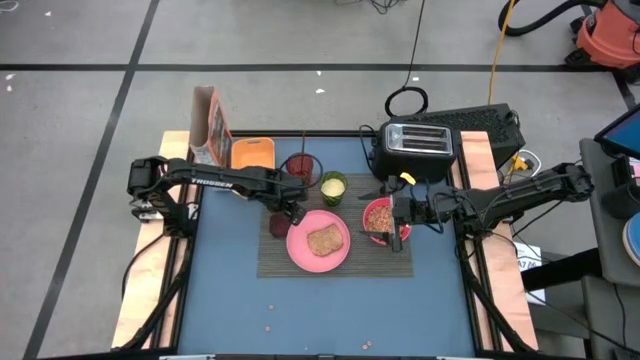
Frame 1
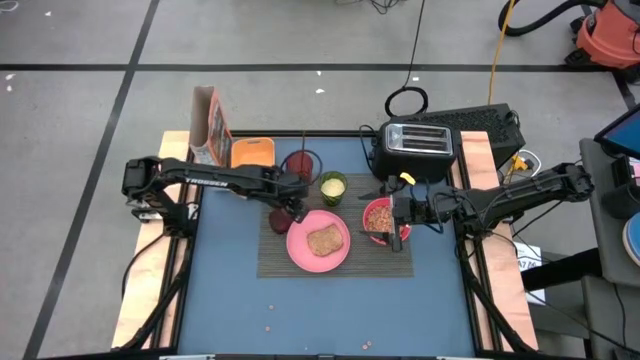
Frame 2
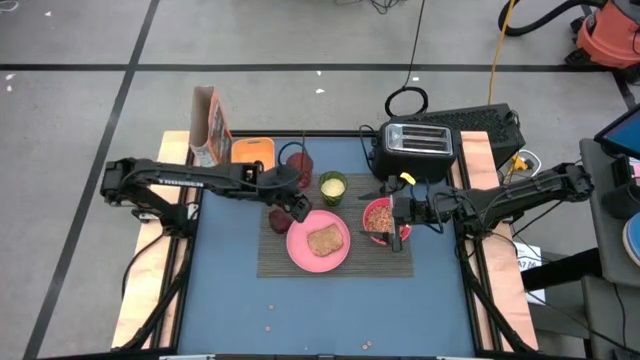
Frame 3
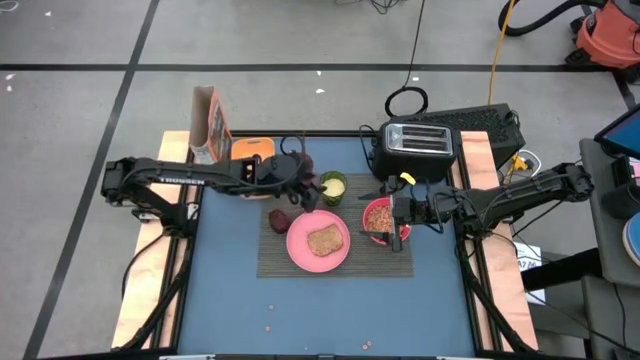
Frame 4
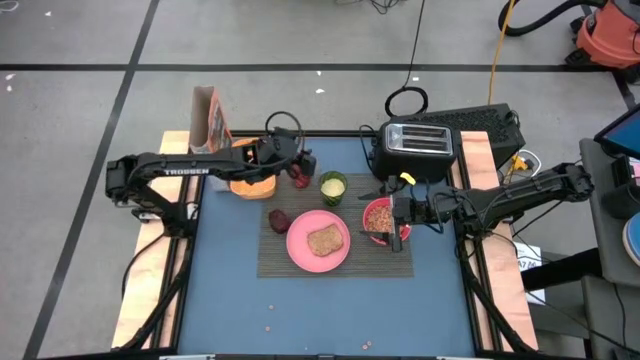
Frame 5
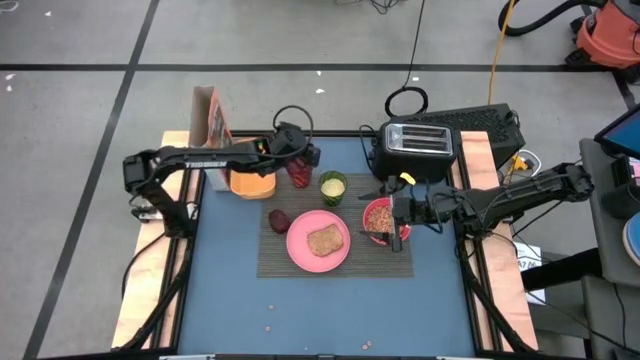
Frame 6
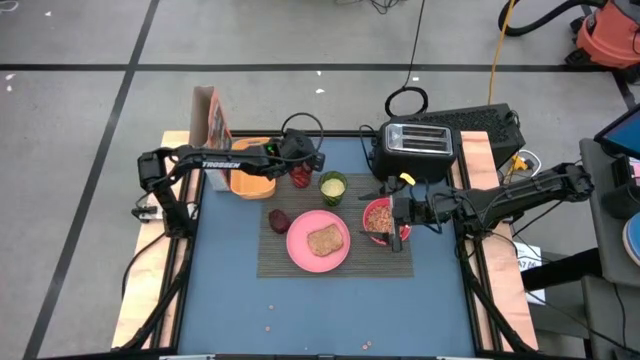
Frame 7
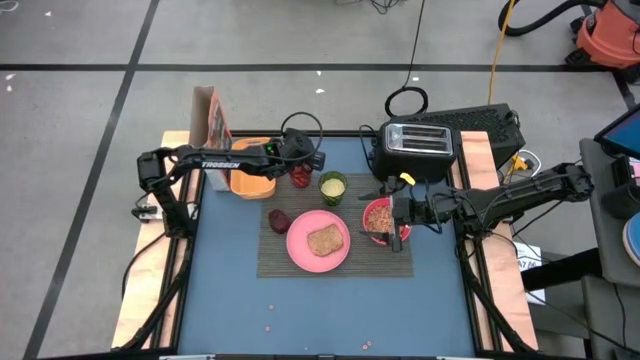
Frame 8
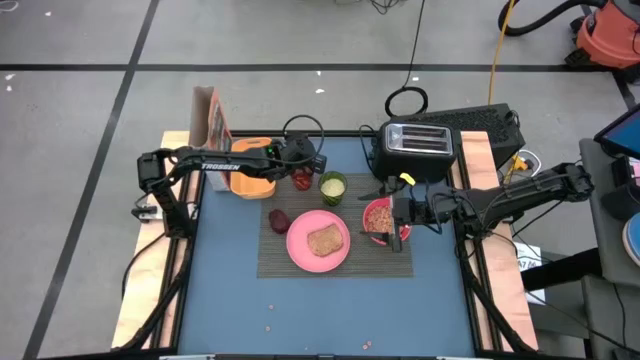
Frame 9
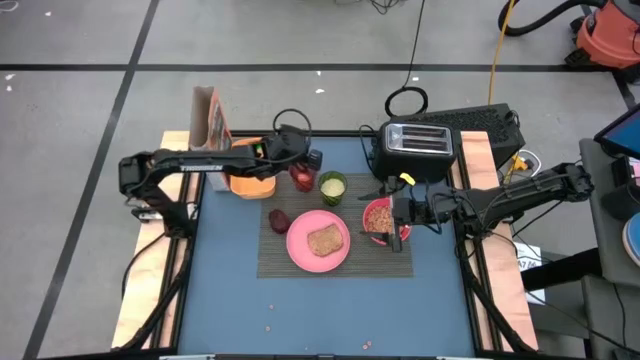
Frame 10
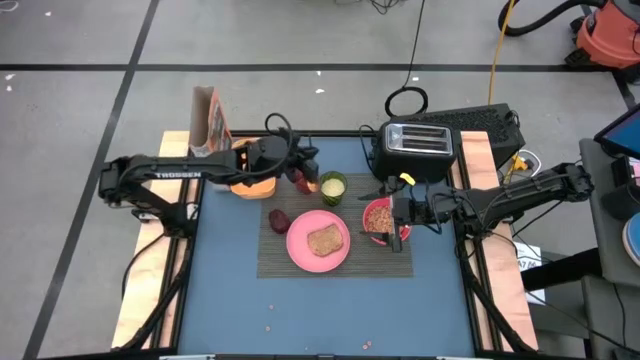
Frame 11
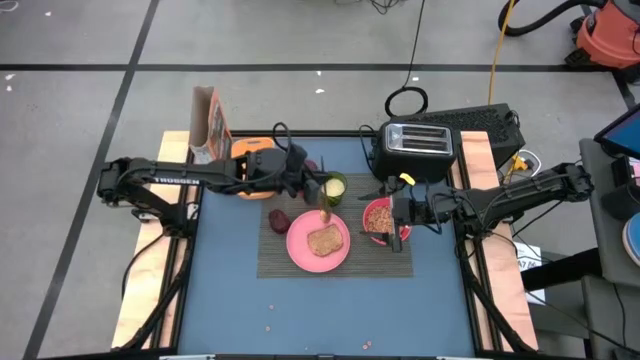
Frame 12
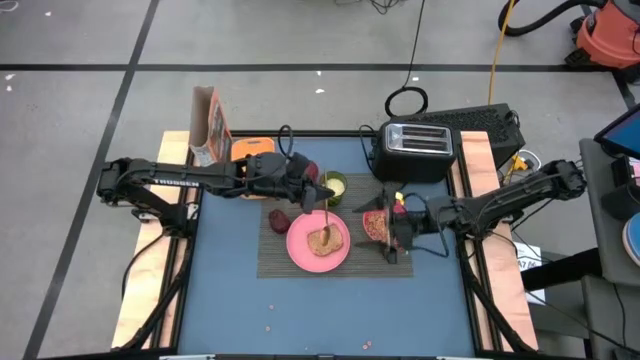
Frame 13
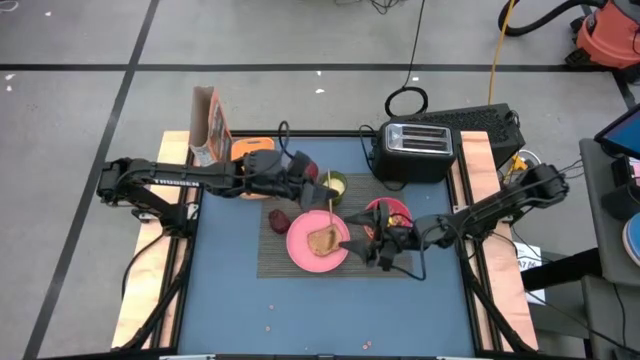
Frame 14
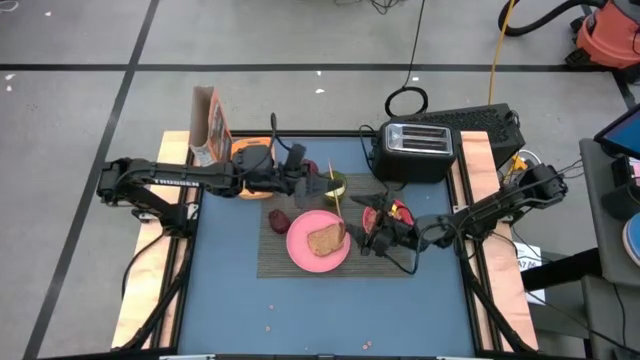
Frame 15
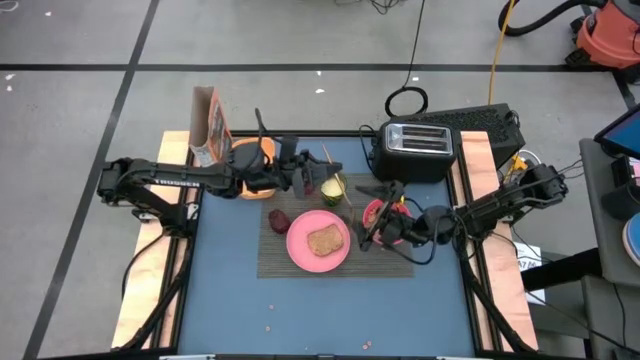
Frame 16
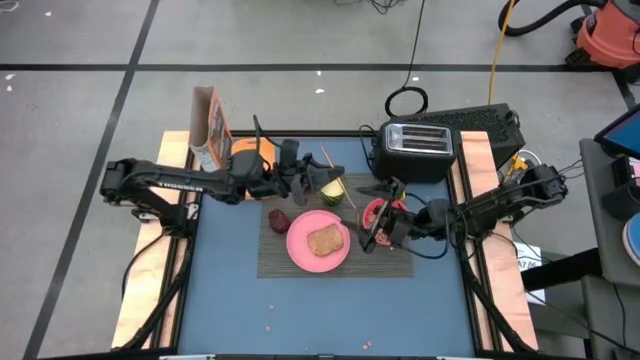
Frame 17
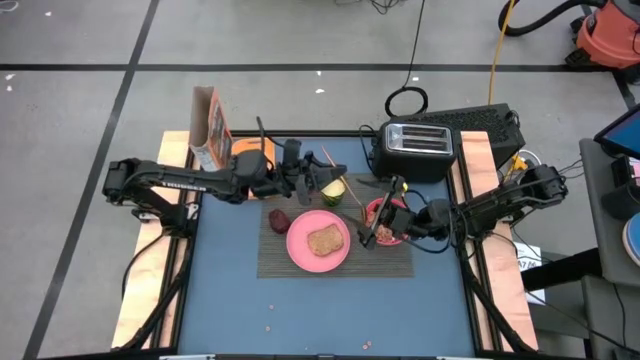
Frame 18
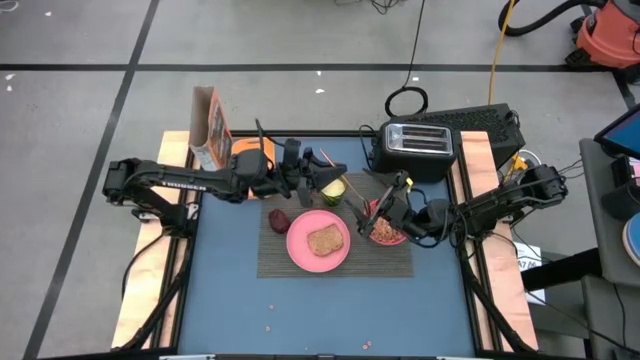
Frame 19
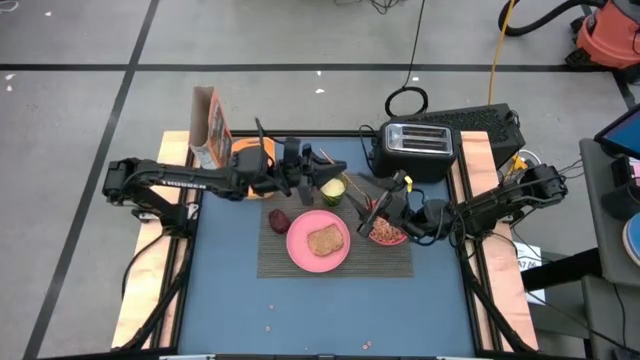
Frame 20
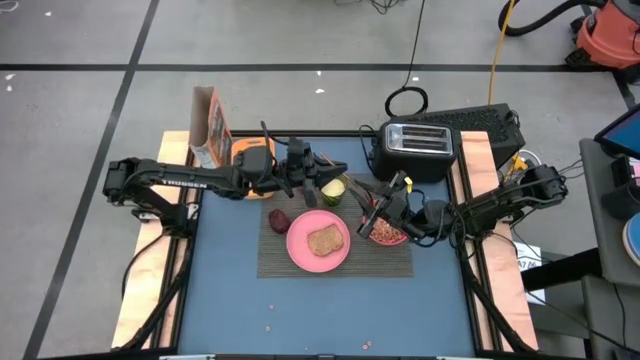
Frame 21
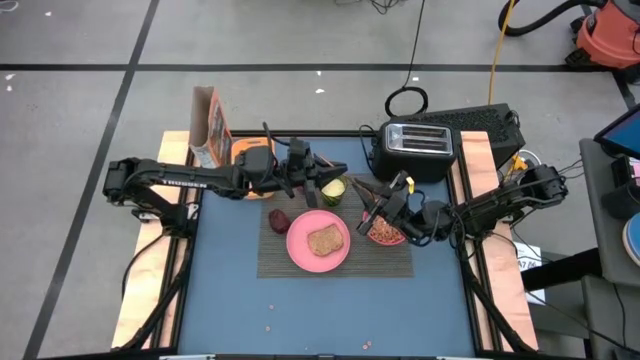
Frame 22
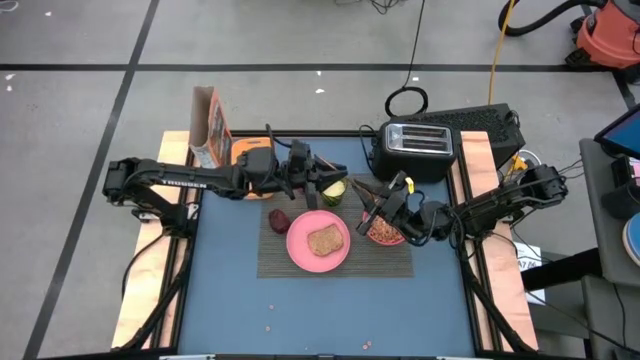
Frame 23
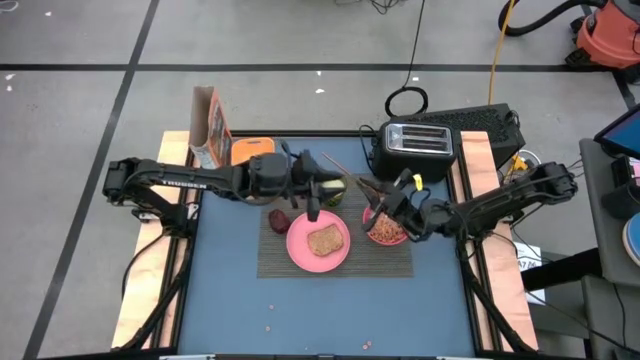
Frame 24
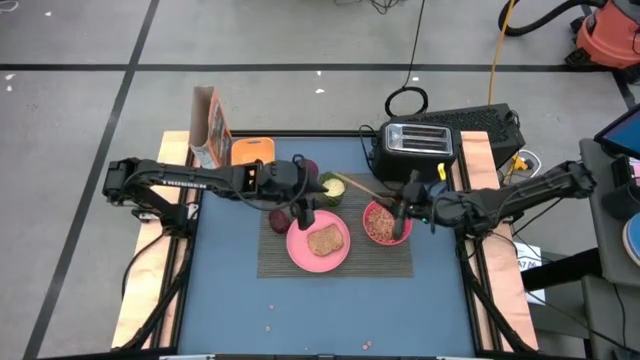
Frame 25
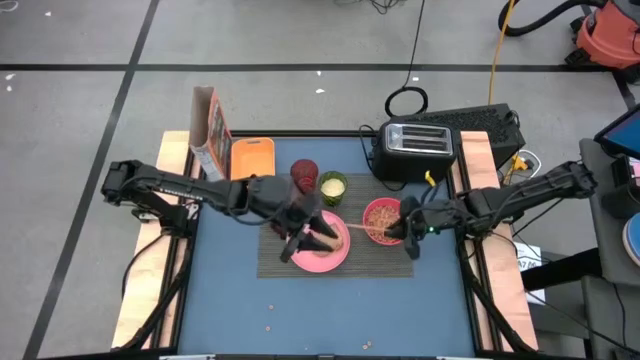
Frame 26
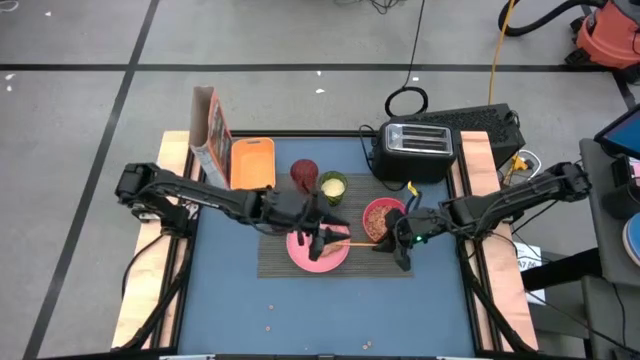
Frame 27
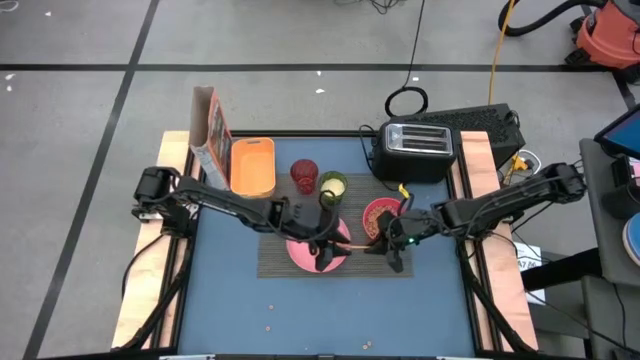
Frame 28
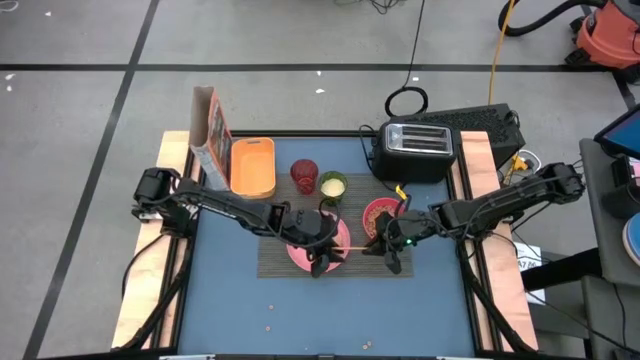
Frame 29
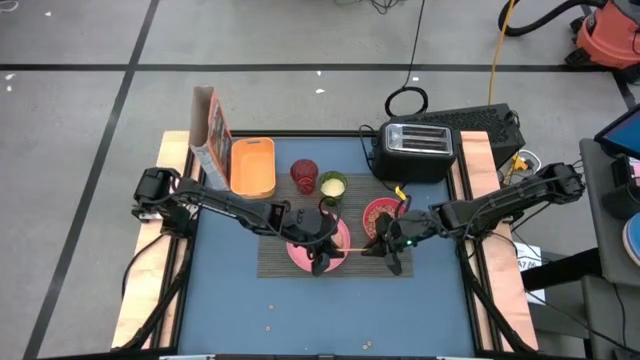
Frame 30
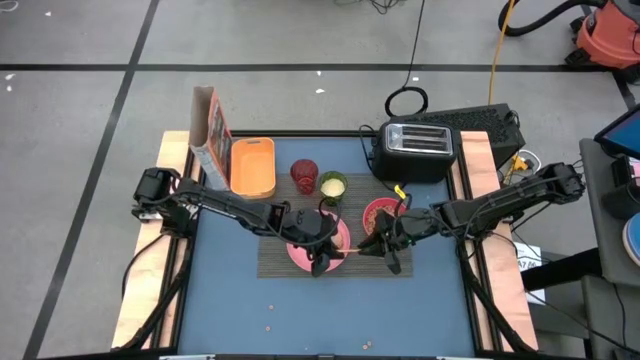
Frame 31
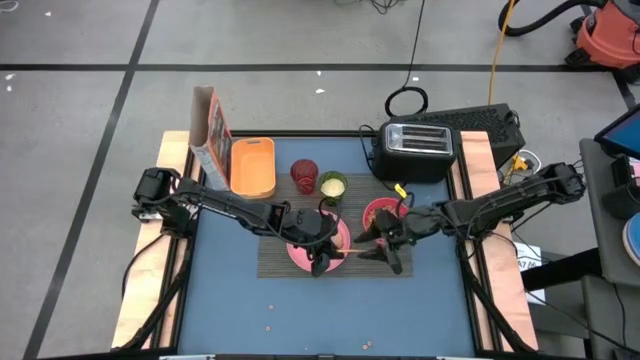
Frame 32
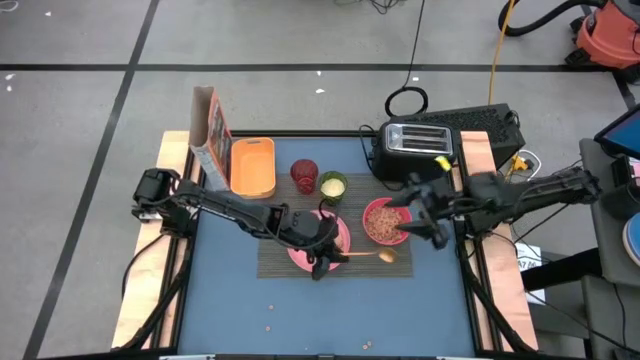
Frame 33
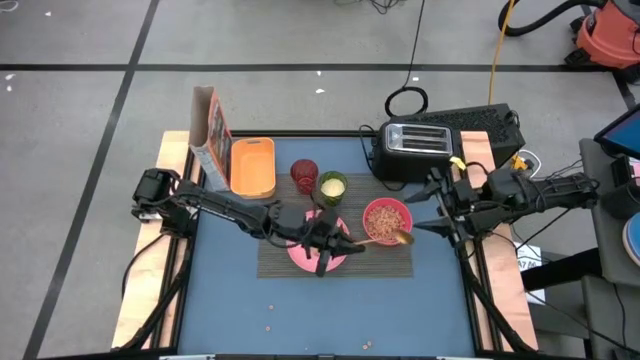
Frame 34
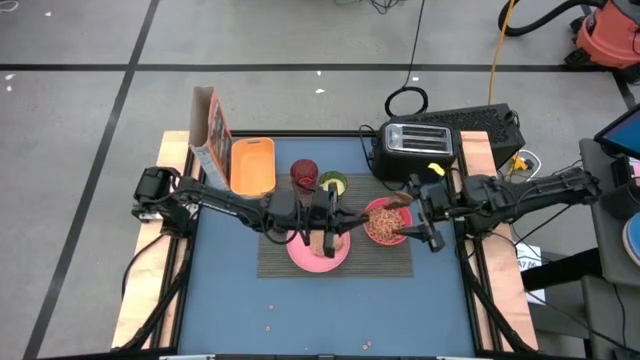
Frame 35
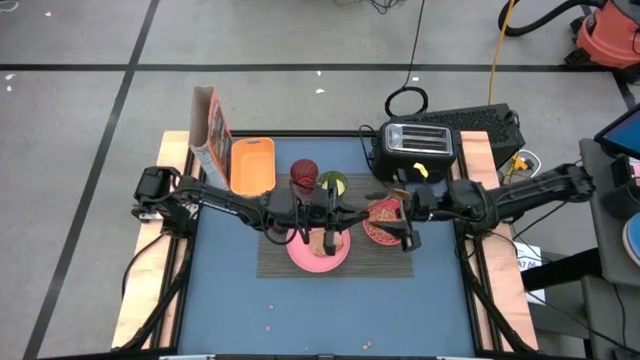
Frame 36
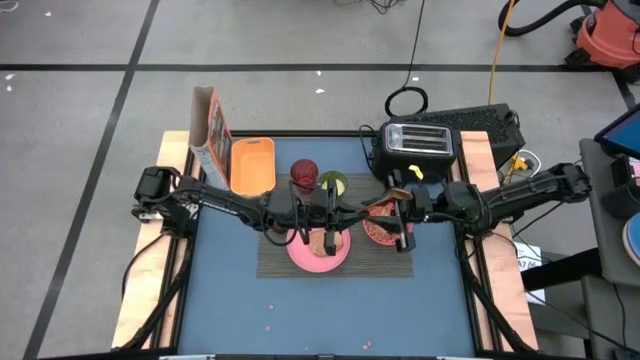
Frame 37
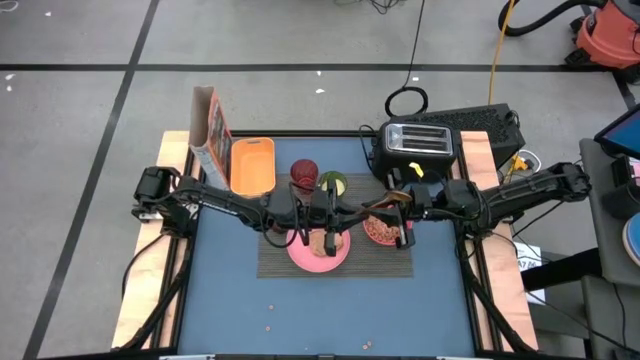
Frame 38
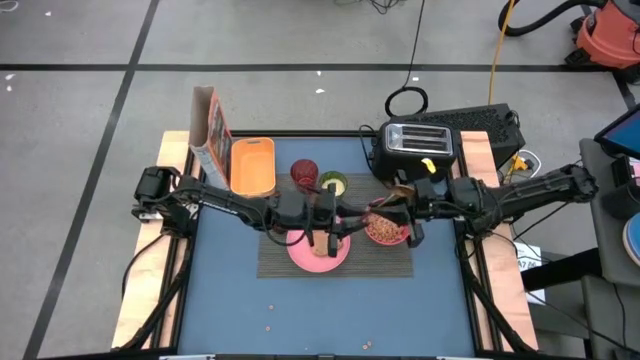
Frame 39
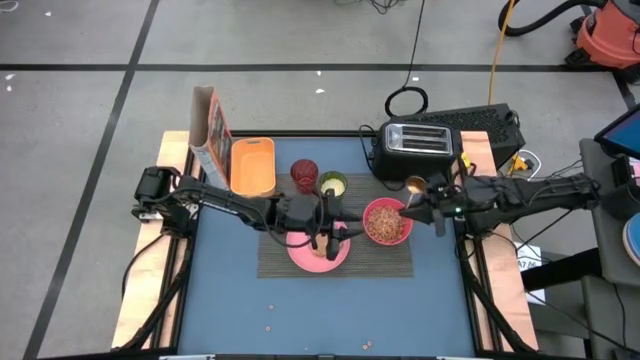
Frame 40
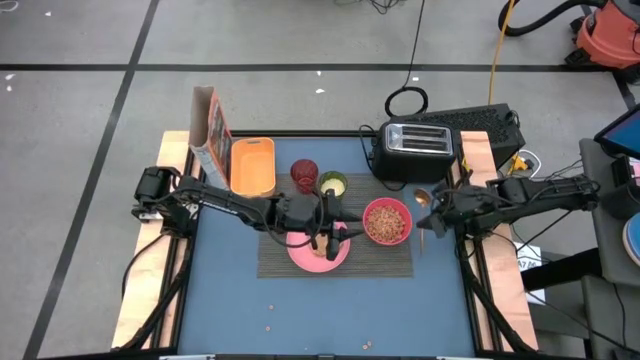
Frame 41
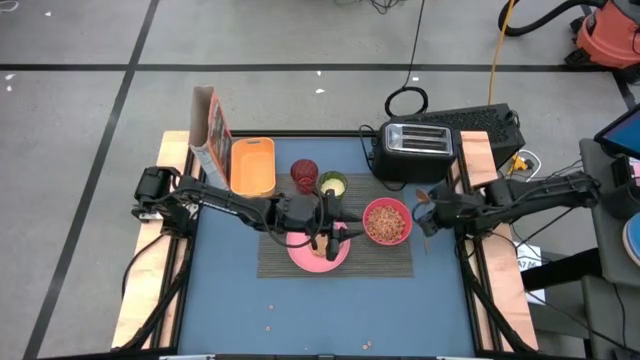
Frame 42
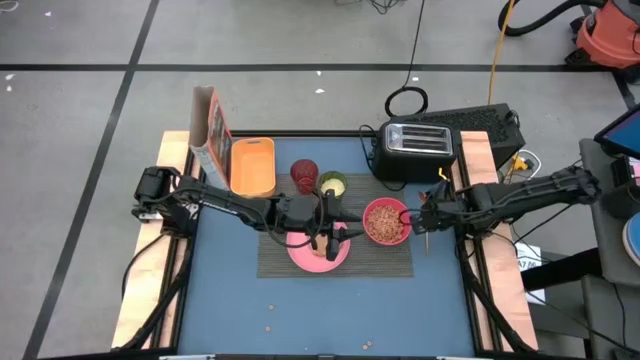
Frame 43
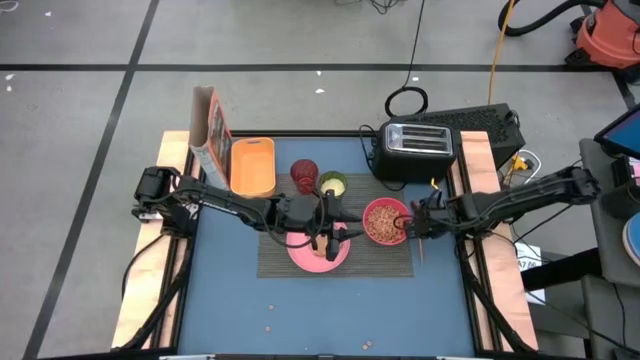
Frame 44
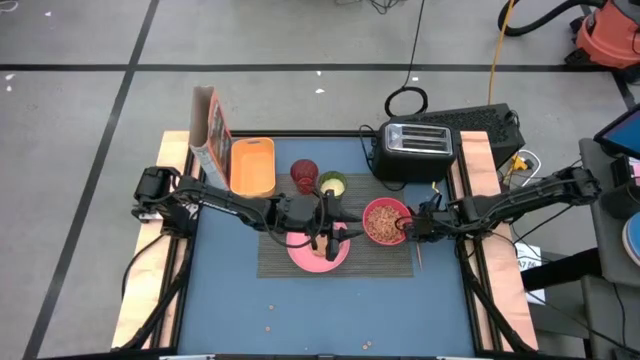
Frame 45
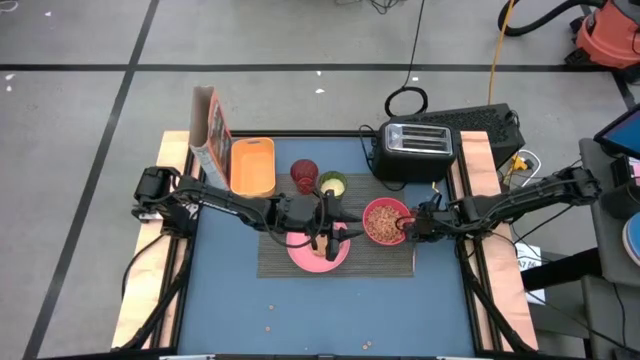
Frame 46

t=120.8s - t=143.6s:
Task: Arrange a breakfast setting
Put the gold spoon to the right of the pink bowl
